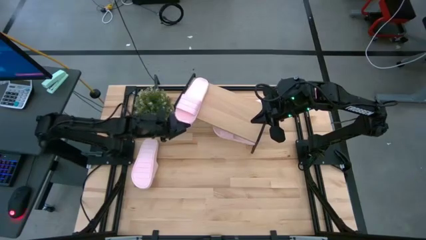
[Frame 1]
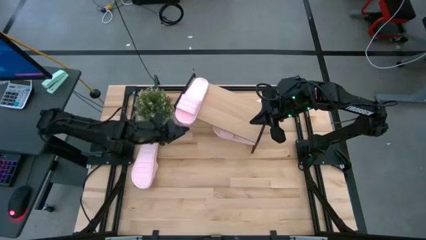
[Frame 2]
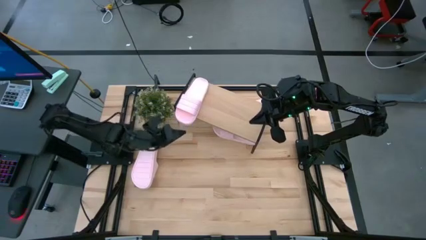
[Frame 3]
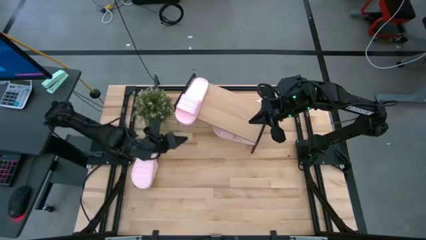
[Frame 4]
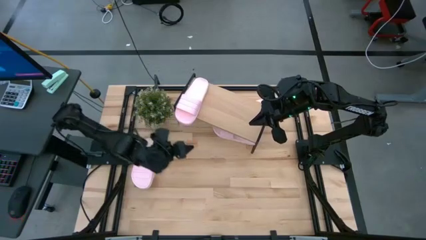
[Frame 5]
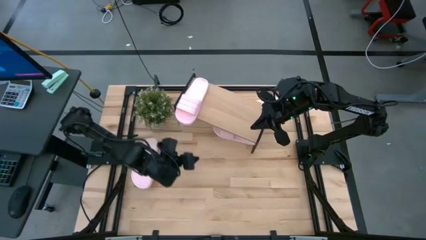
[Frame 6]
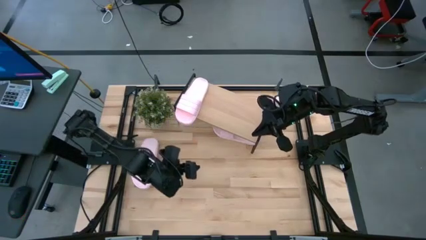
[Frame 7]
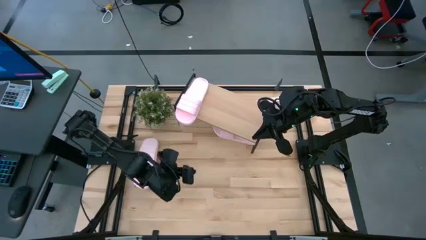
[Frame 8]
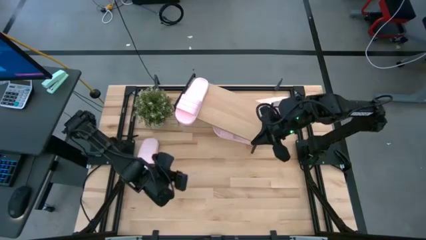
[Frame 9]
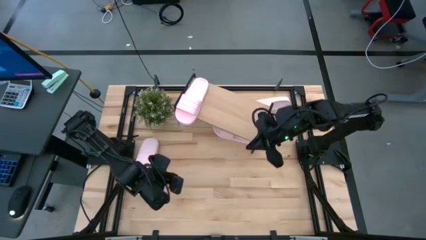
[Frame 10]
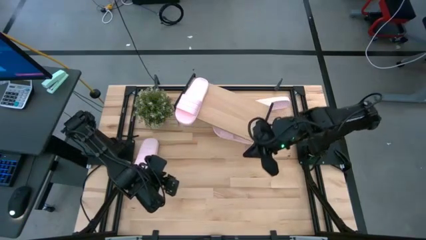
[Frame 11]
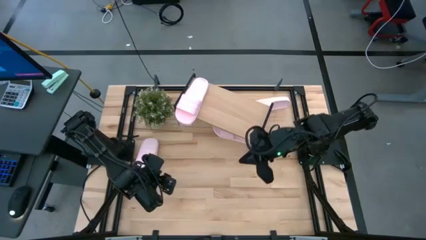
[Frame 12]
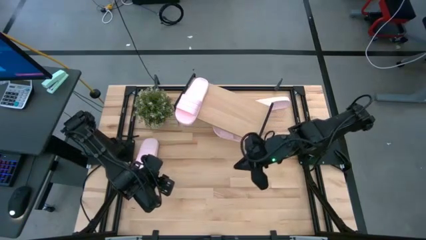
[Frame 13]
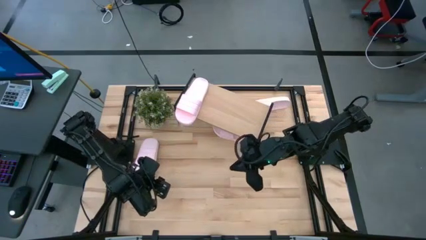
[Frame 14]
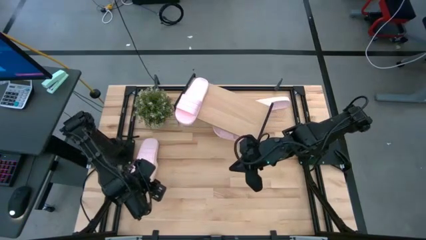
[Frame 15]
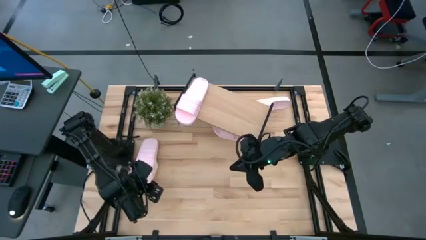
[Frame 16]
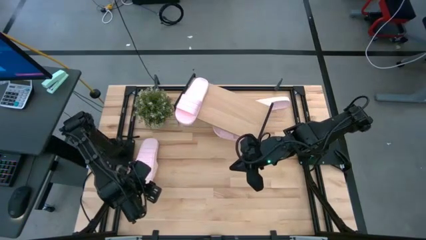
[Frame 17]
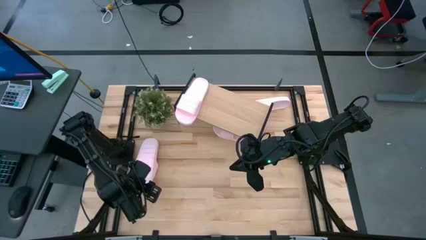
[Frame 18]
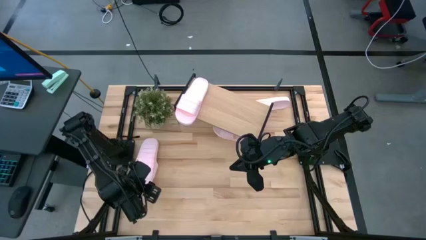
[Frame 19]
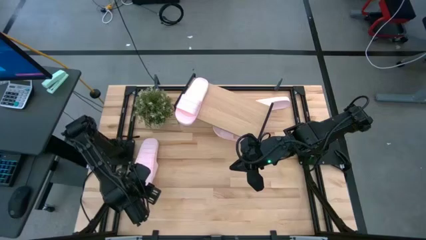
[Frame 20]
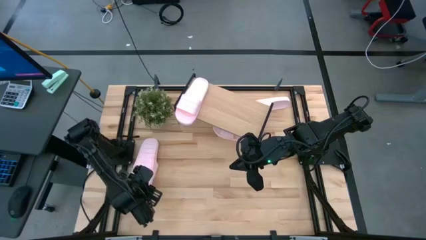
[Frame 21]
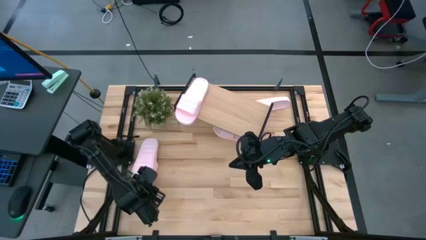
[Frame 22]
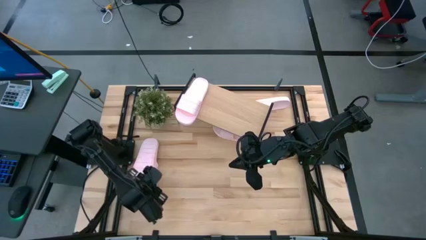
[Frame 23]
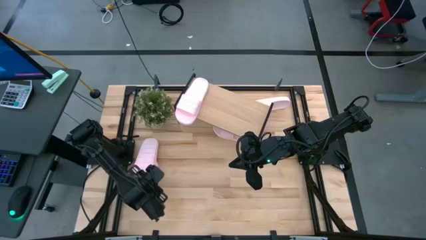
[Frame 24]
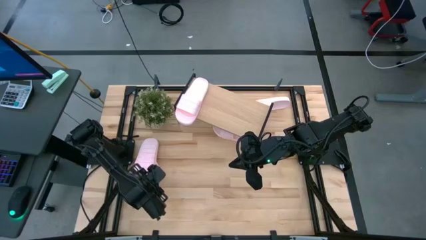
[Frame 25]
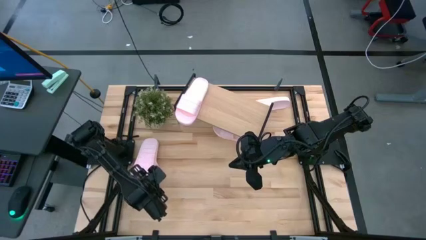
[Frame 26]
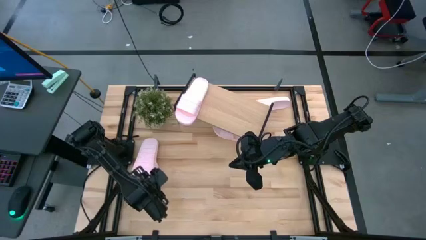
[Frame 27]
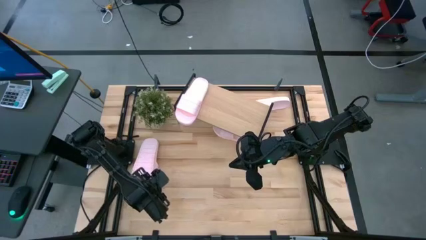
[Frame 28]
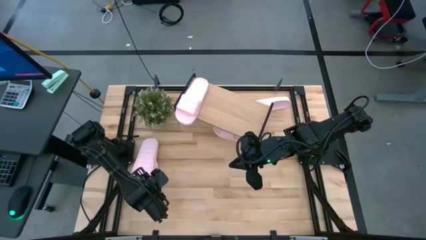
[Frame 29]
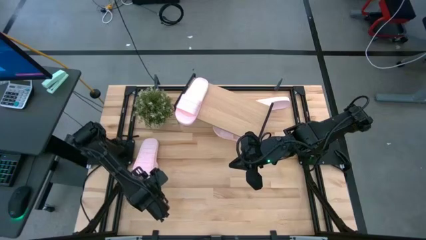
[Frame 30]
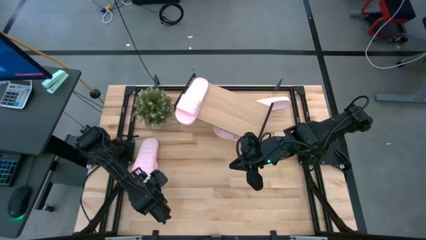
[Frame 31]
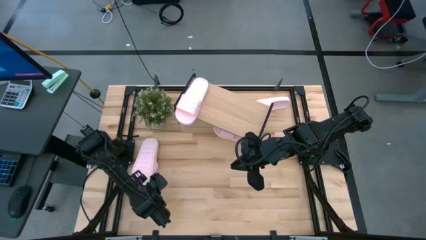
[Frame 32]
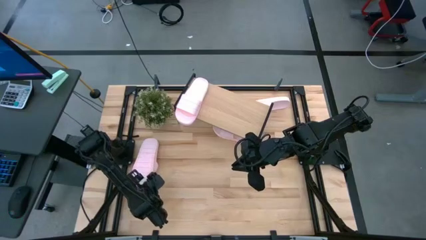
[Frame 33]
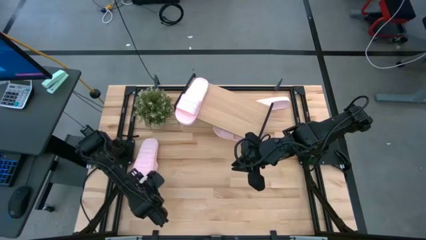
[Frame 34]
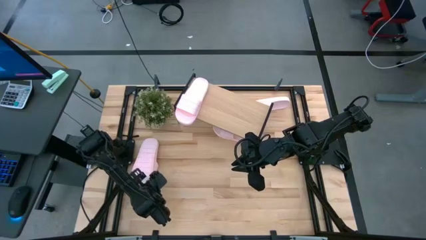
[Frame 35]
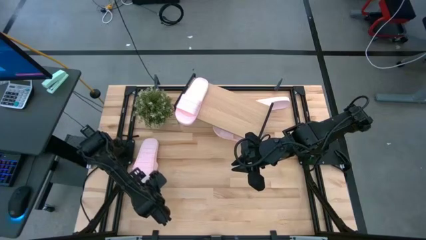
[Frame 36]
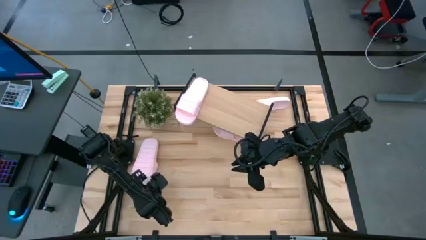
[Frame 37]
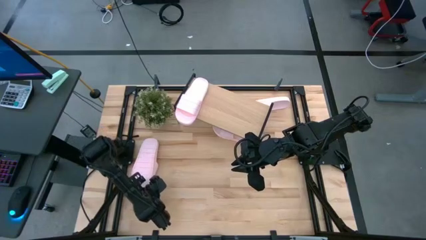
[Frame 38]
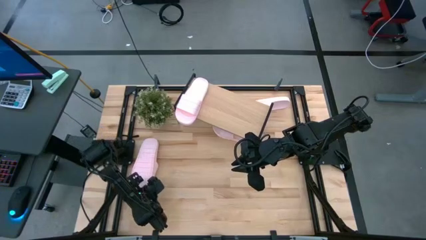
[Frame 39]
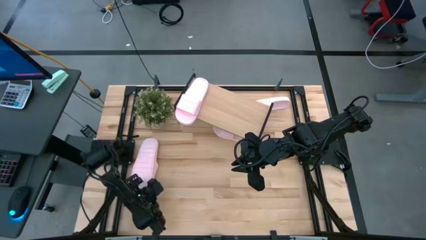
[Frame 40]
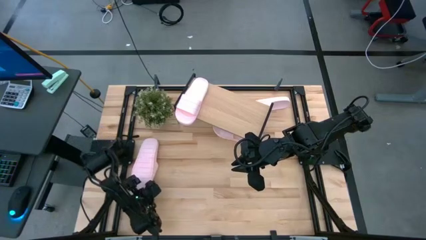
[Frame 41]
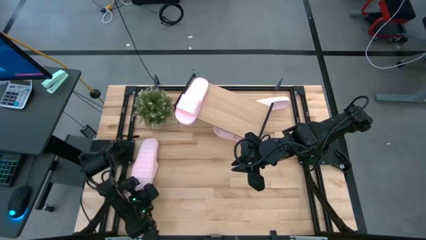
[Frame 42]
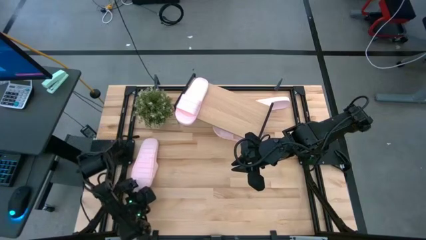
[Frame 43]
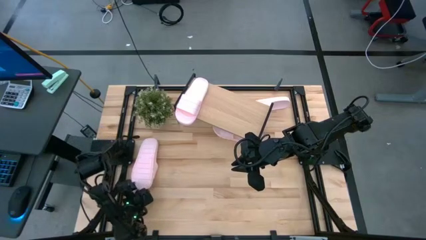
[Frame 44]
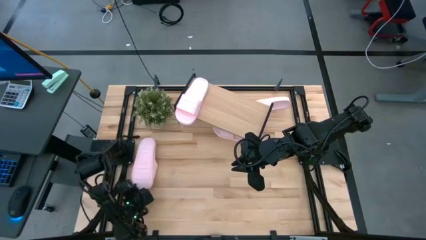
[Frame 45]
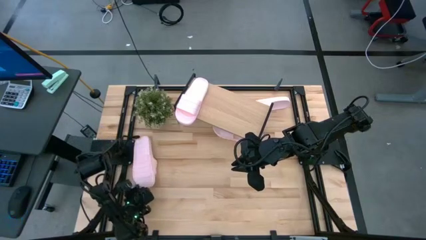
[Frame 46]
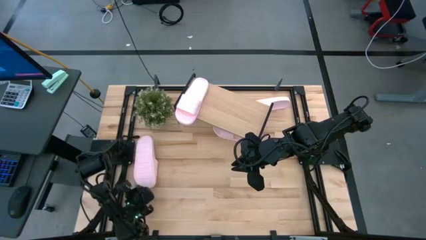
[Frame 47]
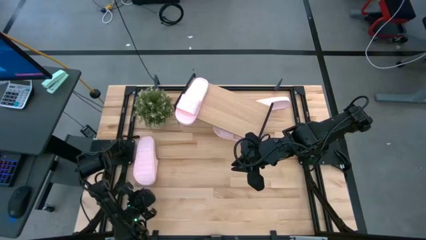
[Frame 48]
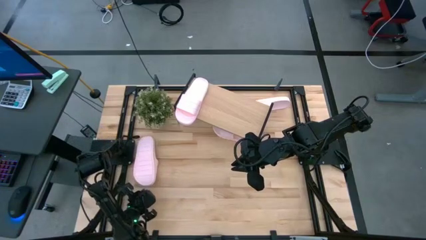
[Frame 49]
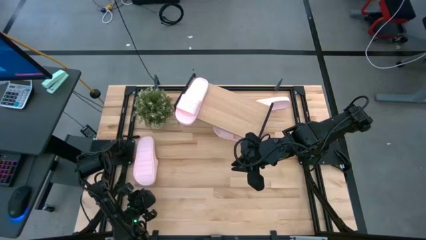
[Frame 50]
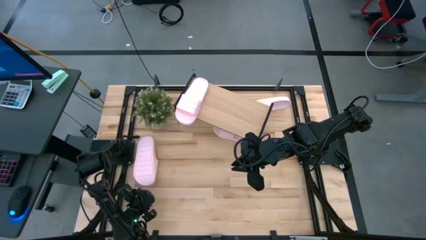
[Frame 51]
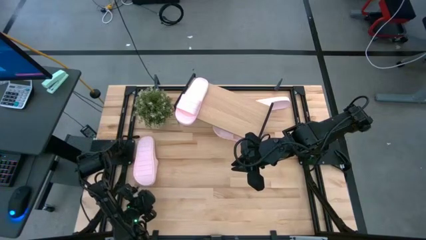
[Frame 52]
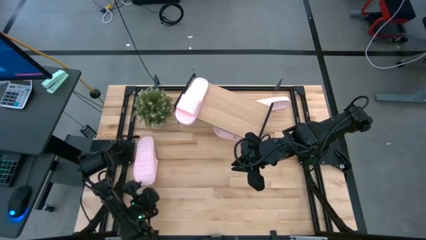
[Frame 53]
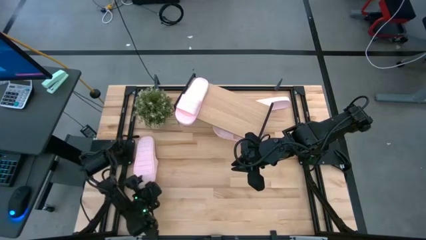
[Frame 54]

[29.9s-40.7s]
Task: Pick and place slides into the shelf
Put the pink slide on the shelf
